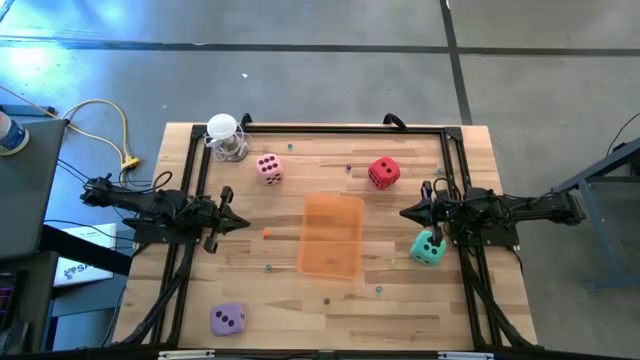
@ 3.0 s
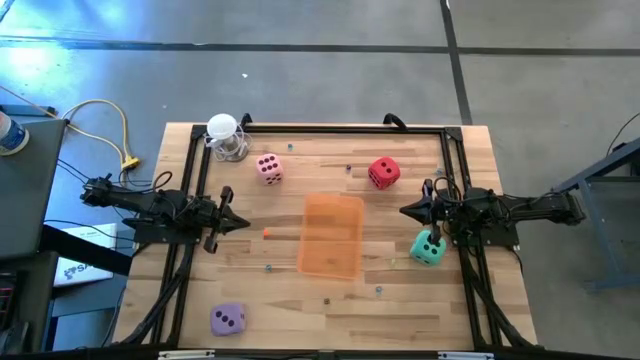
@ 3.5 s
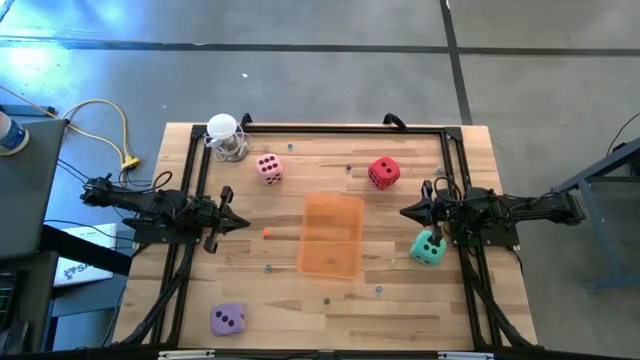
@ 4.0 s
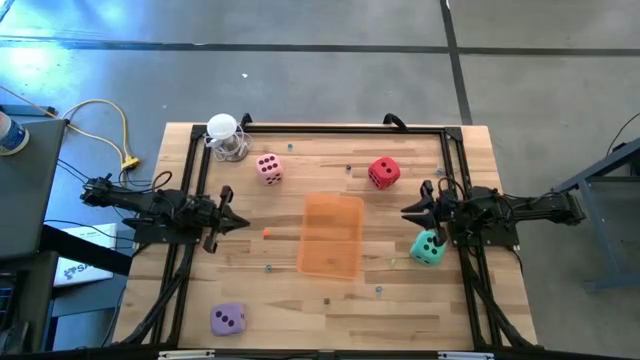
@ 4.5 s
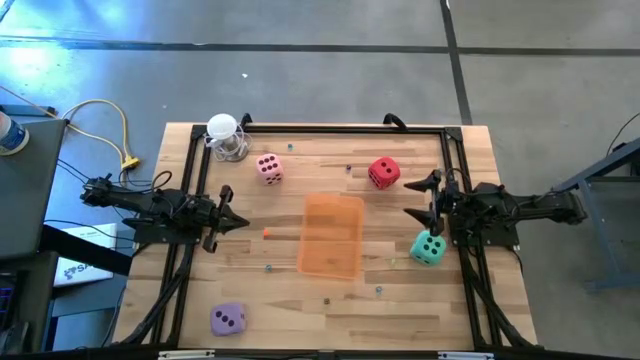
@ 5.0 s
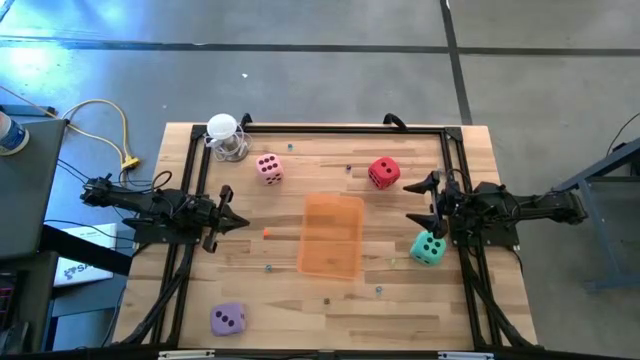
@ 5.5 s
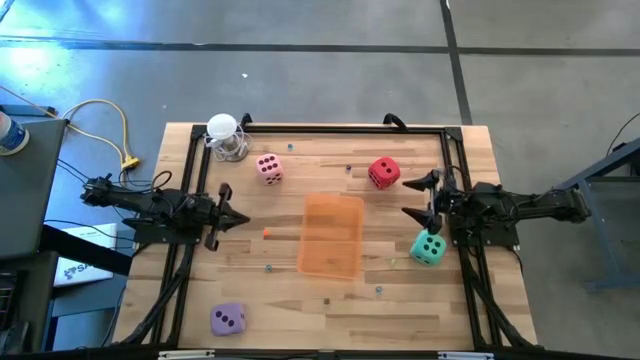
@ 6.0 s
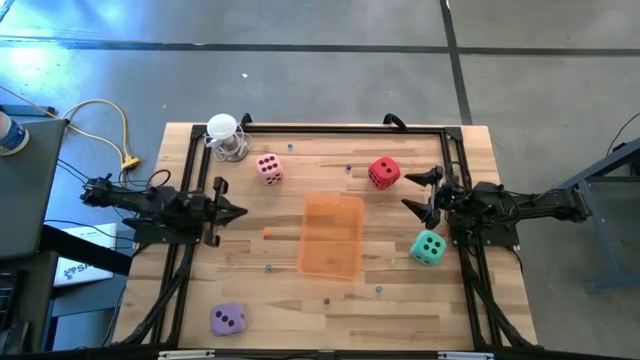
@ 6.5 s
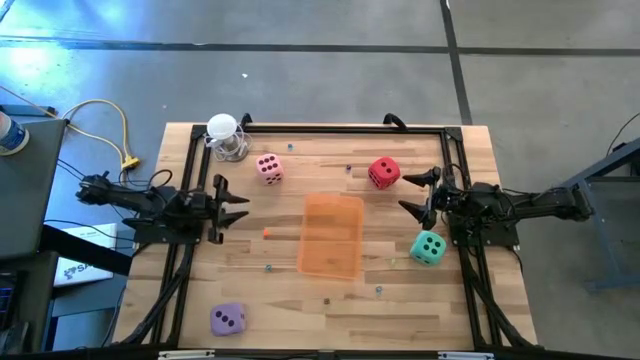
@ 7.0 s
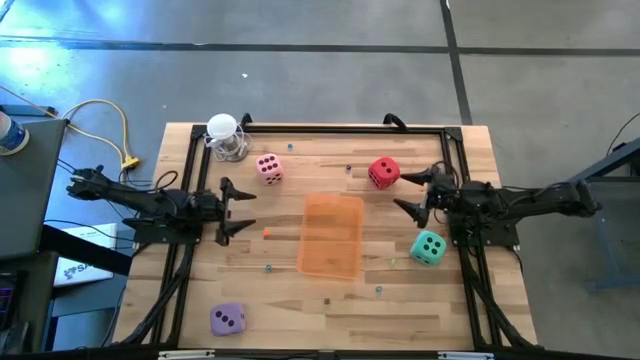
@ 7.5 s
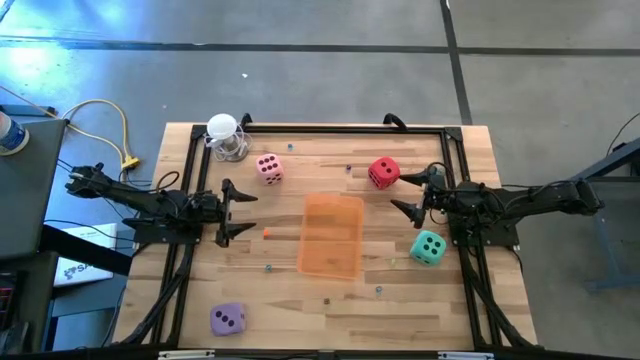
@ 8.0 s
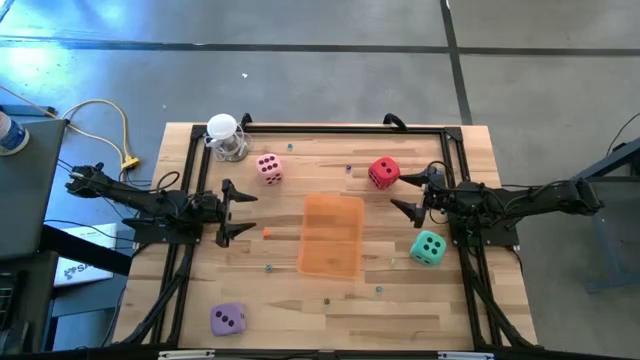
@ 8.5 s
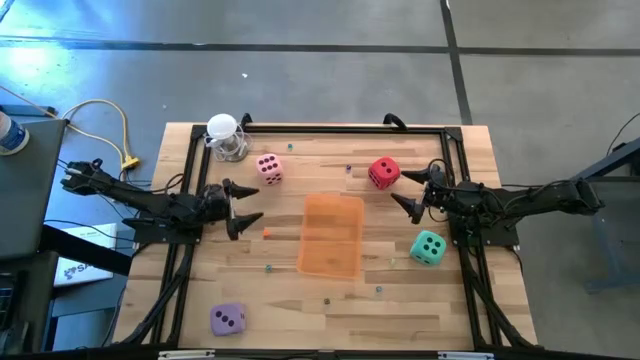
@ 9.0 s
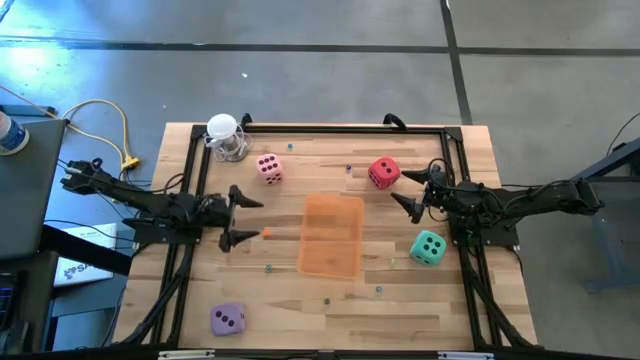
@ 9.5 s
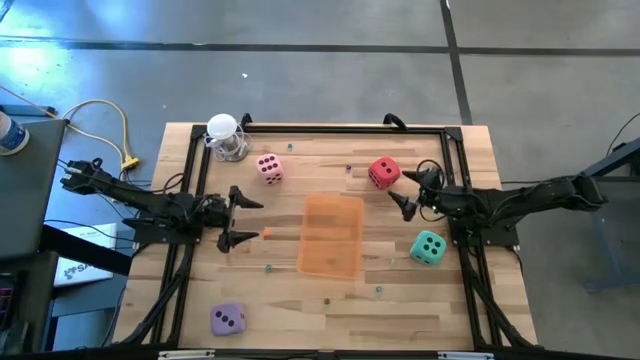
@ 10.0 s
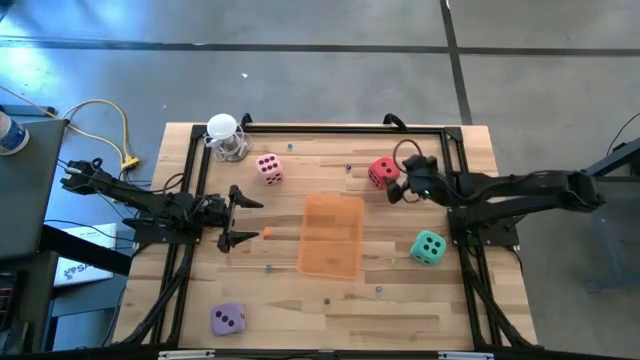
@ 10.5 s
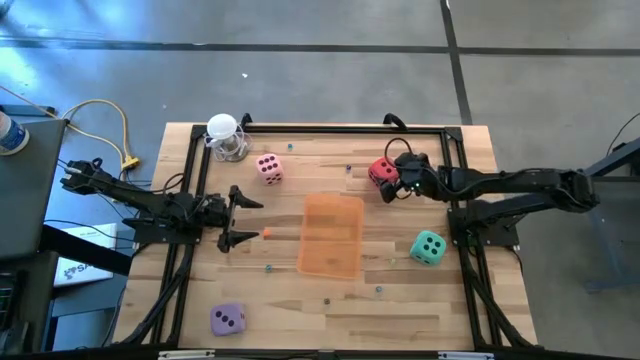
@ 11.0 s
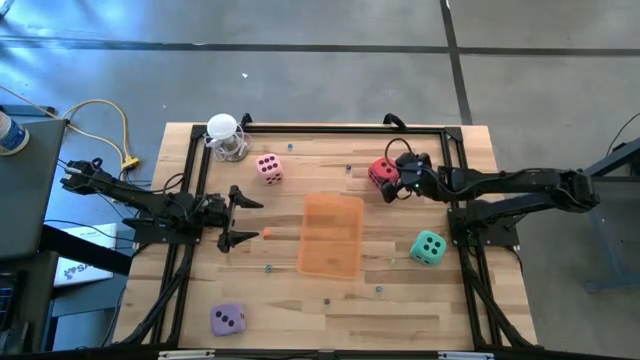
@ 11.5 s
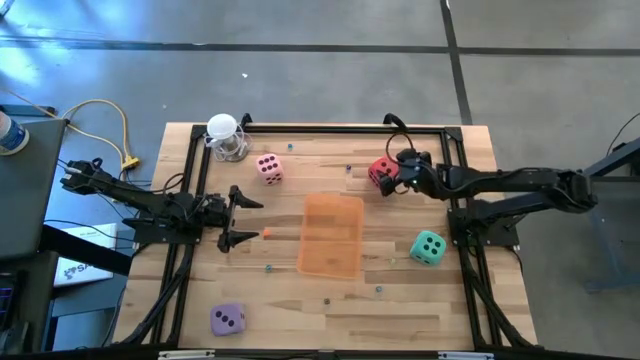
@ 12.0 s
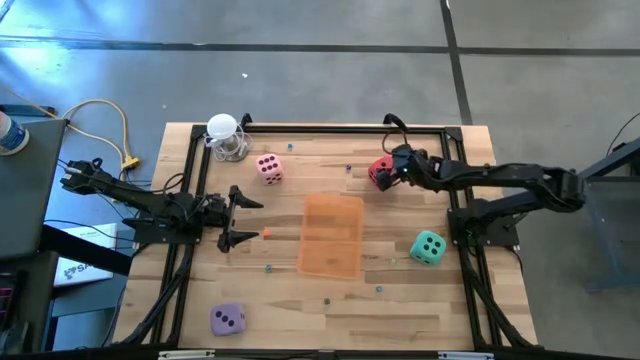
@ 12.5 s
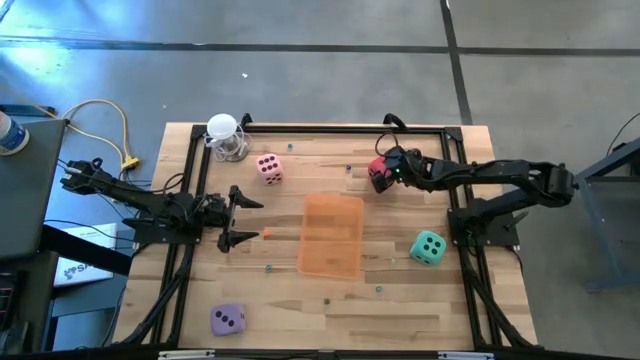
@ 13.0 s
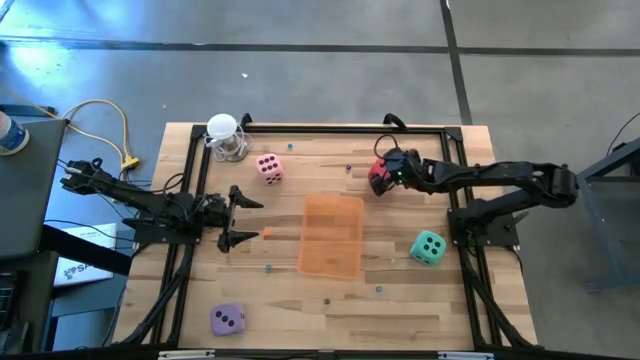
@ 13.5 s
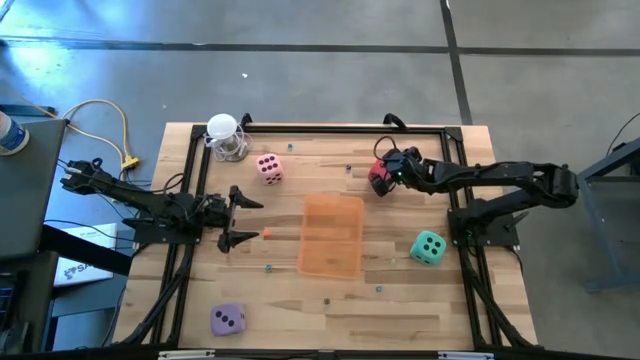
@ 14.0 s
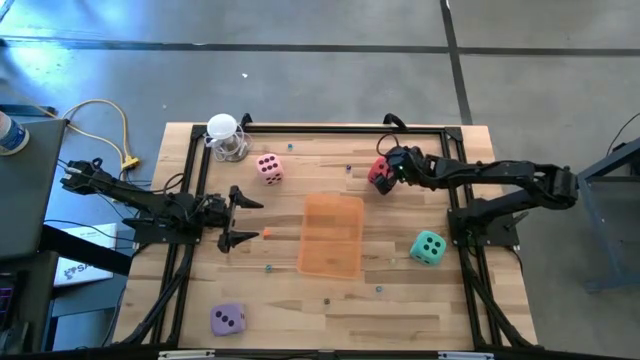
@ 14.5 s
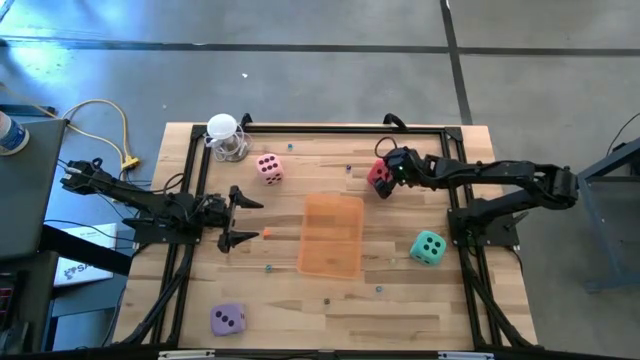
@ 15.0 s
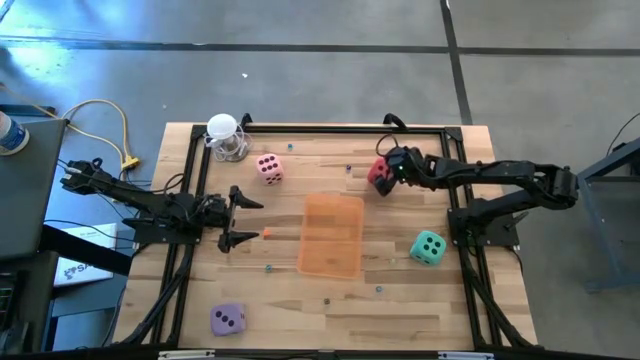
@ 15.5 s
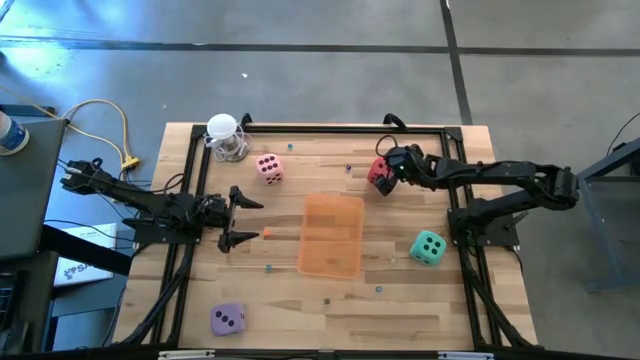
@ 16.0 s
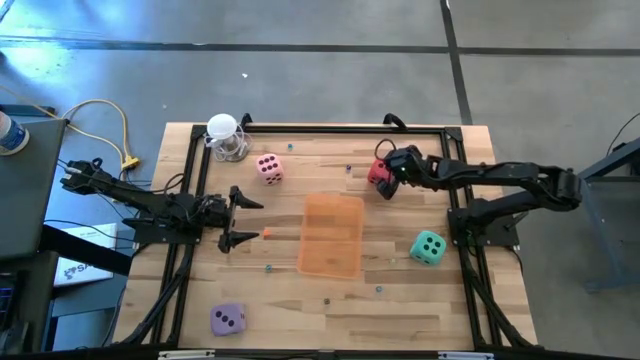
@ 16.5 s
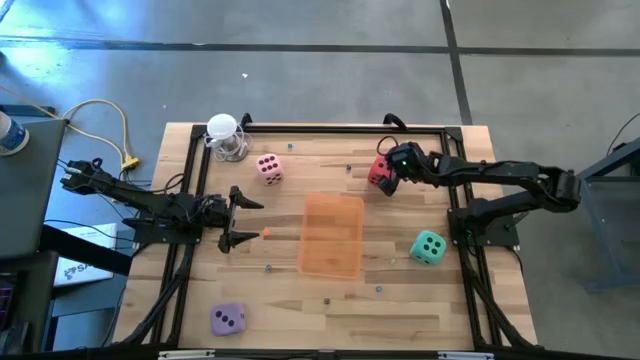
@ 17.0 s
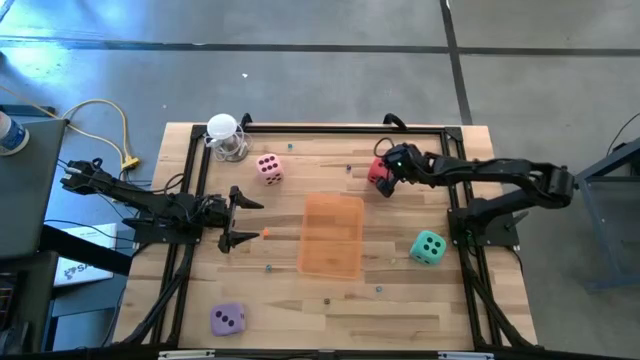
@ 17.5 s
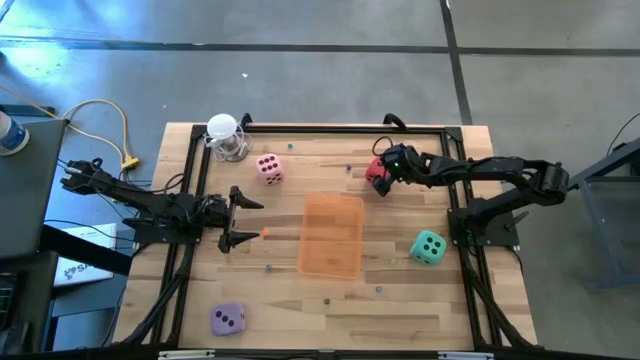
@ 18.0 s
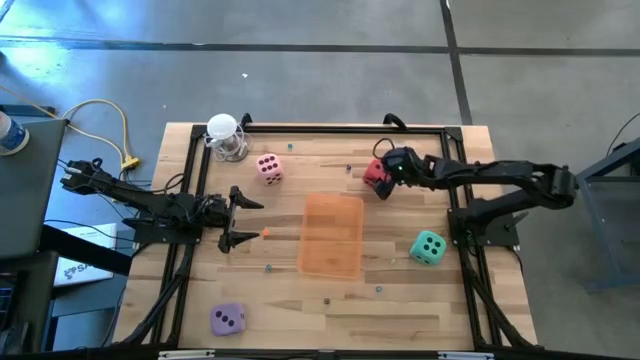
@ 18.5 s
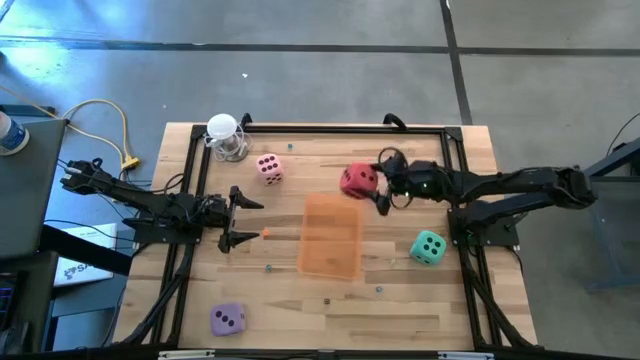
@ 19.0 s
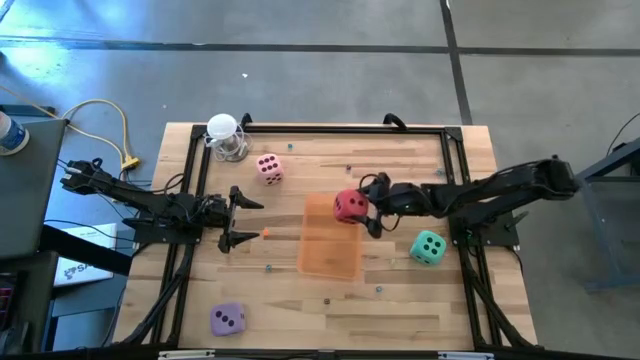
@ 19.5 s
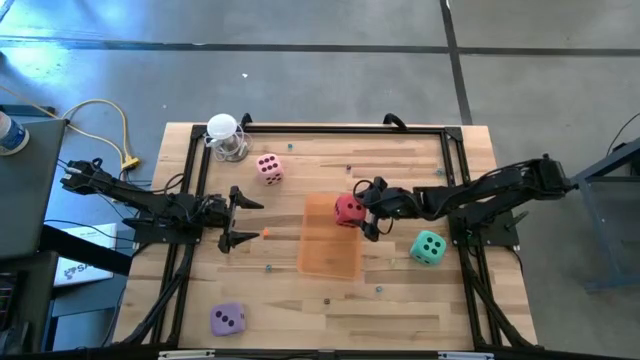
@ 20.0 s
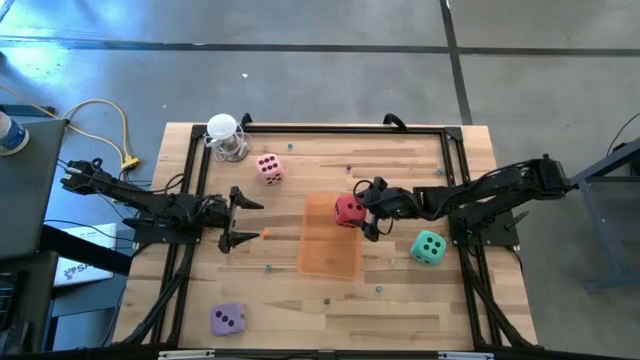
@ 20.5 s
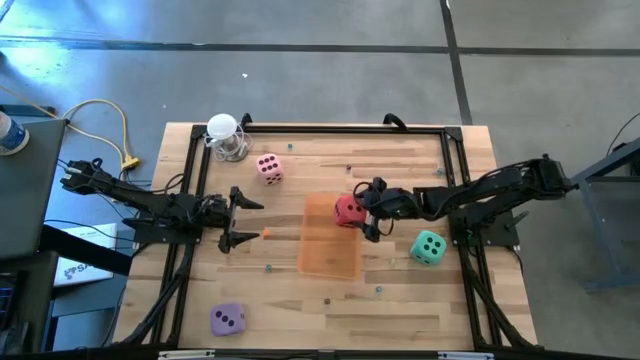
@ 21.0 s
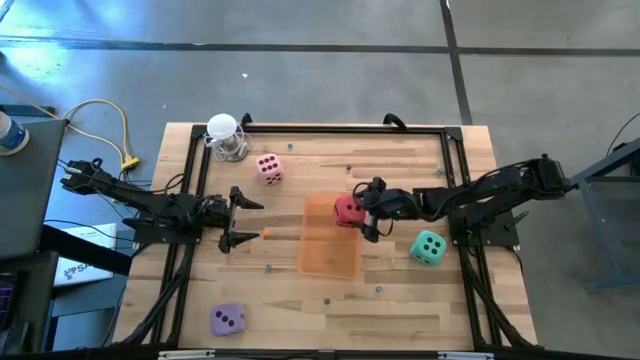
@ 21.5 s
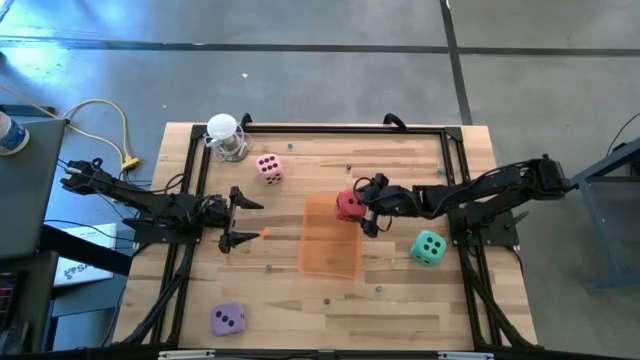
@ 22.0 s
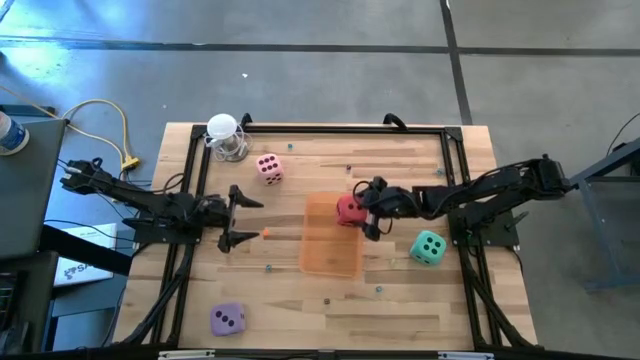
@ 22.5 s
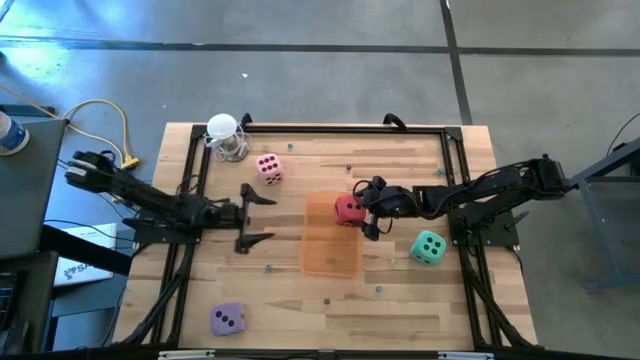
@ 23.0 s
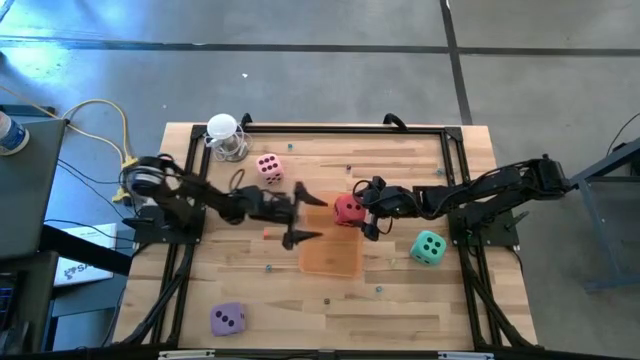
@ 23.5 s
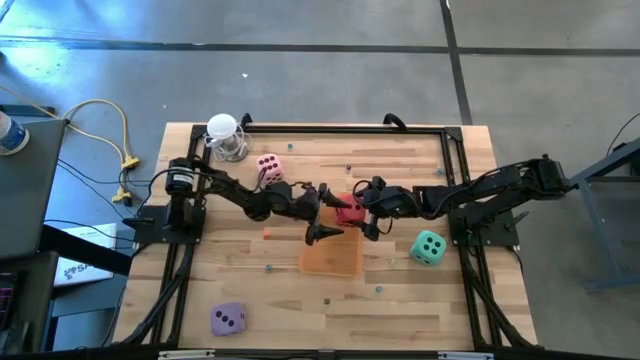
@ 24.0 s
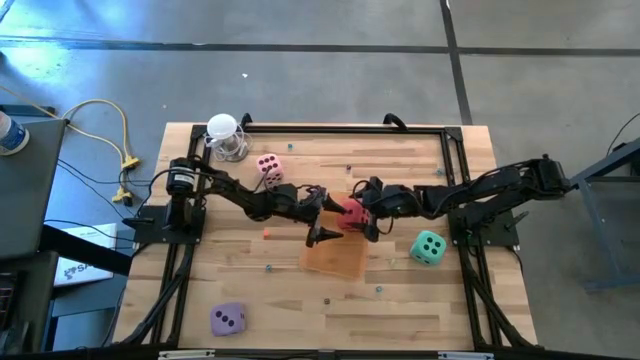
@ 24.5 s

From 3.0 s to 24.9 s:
Task: Pick & Place Dice
Put the large red die into the orange bin
